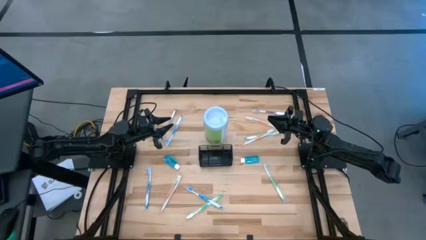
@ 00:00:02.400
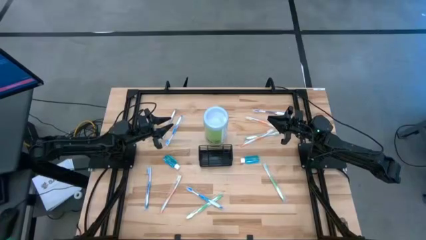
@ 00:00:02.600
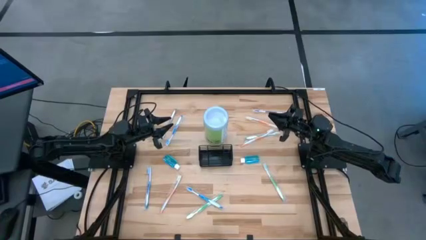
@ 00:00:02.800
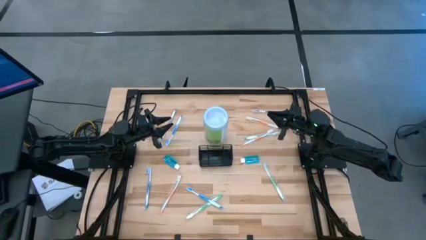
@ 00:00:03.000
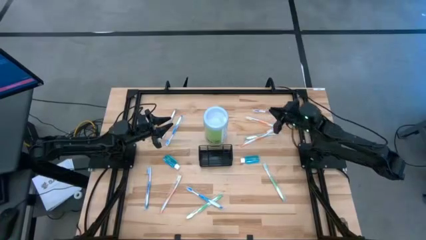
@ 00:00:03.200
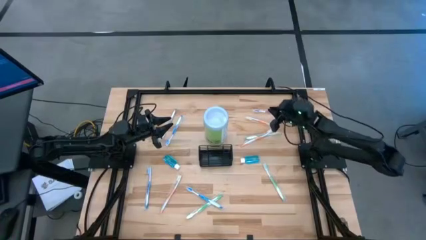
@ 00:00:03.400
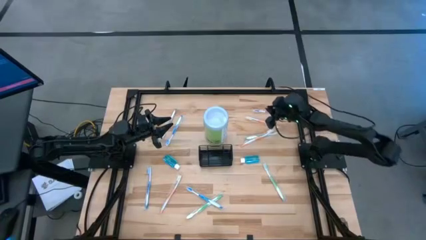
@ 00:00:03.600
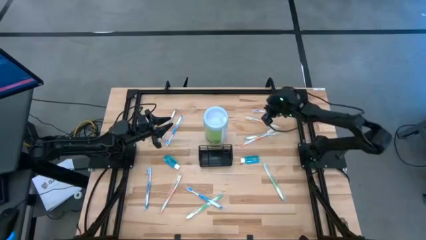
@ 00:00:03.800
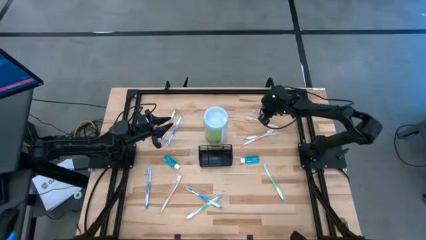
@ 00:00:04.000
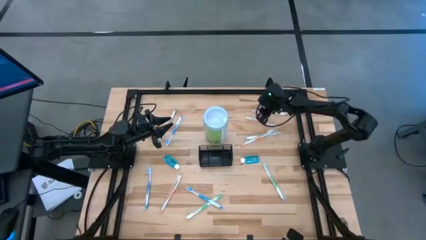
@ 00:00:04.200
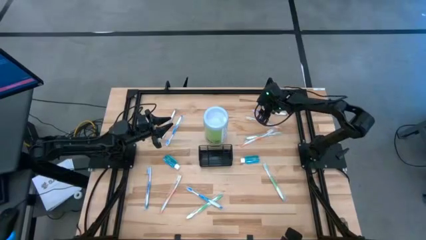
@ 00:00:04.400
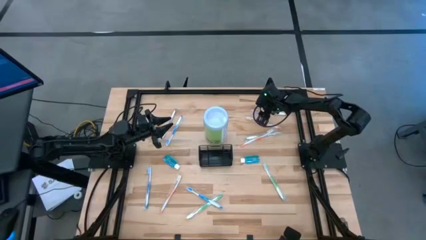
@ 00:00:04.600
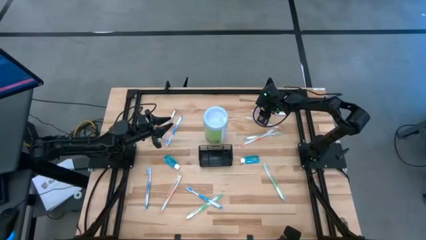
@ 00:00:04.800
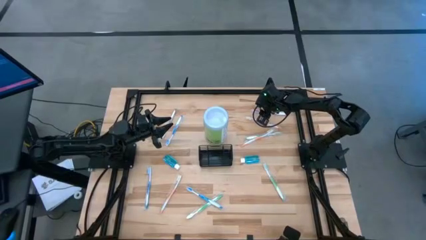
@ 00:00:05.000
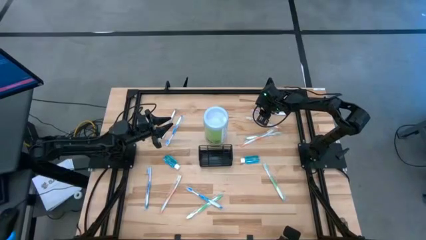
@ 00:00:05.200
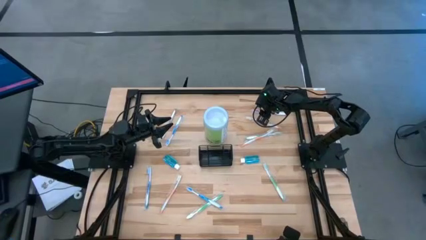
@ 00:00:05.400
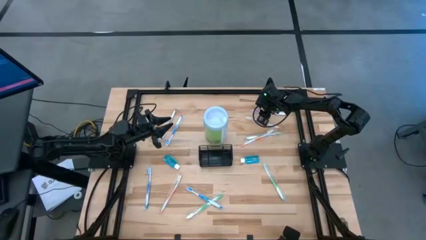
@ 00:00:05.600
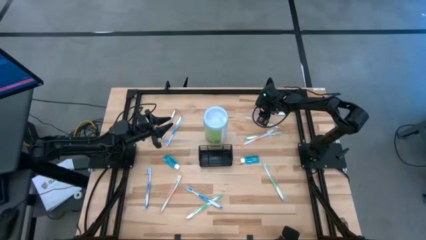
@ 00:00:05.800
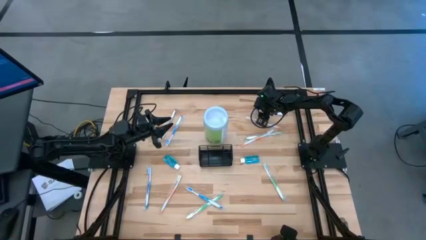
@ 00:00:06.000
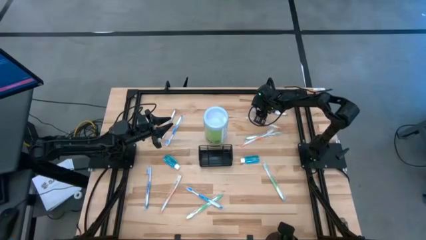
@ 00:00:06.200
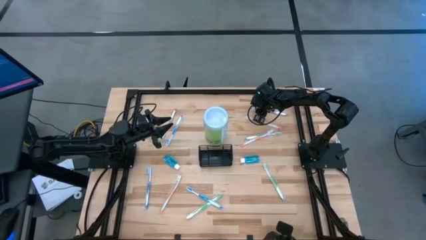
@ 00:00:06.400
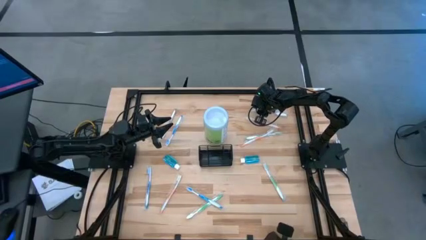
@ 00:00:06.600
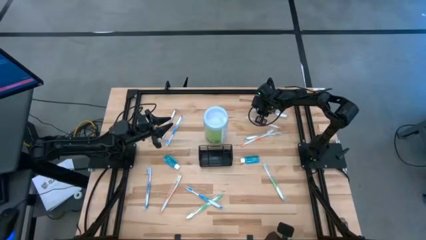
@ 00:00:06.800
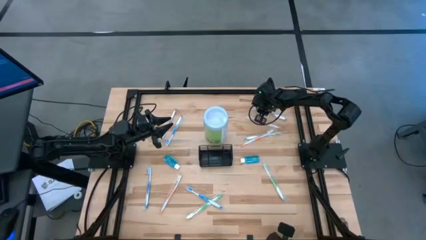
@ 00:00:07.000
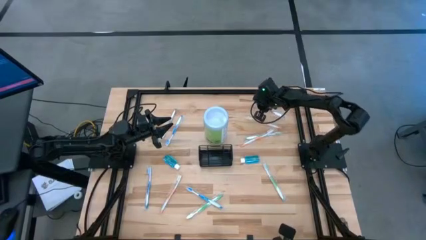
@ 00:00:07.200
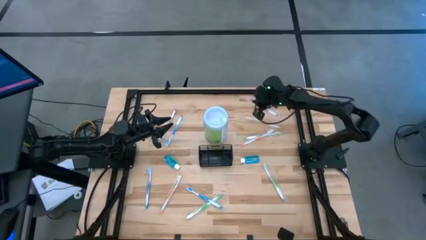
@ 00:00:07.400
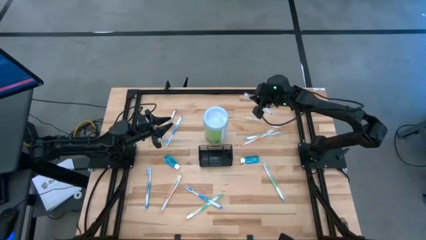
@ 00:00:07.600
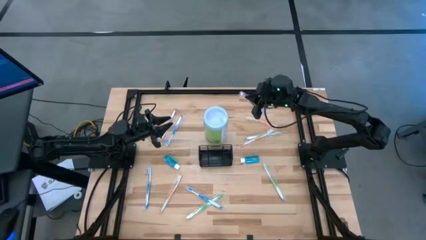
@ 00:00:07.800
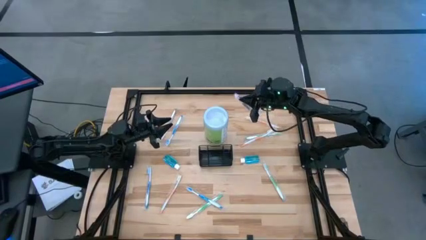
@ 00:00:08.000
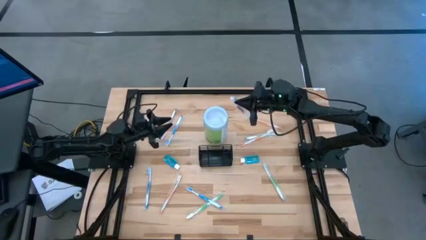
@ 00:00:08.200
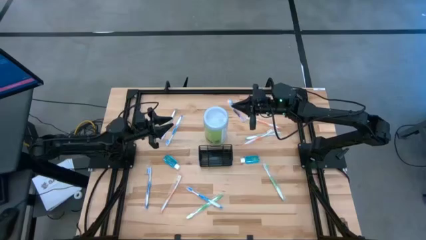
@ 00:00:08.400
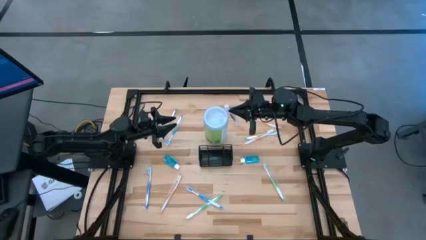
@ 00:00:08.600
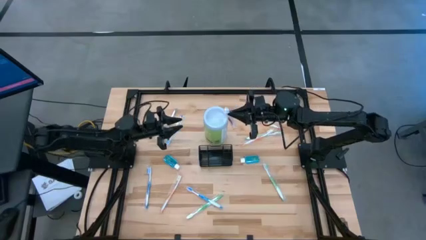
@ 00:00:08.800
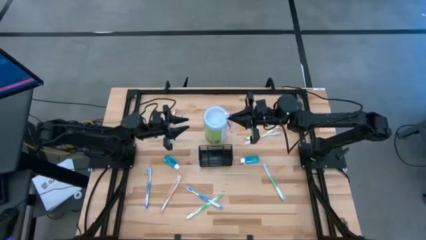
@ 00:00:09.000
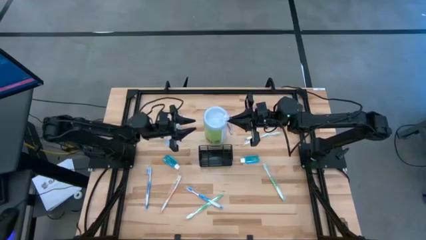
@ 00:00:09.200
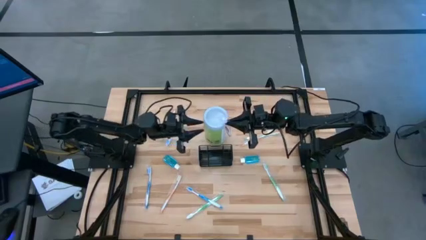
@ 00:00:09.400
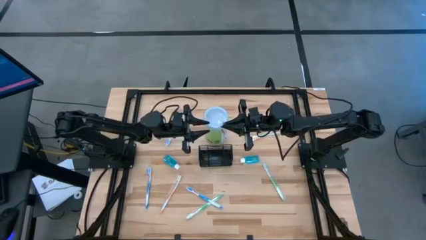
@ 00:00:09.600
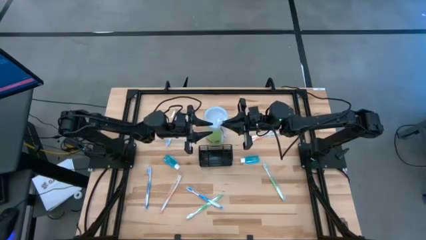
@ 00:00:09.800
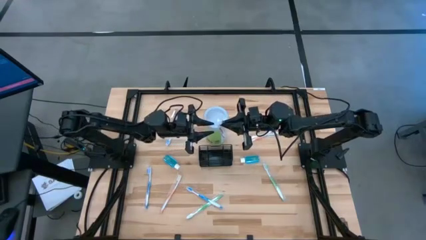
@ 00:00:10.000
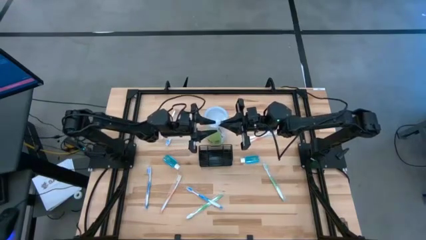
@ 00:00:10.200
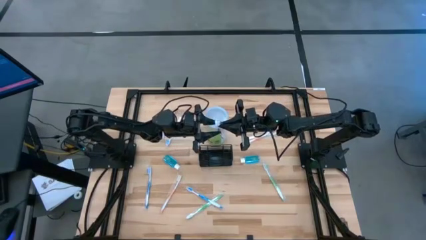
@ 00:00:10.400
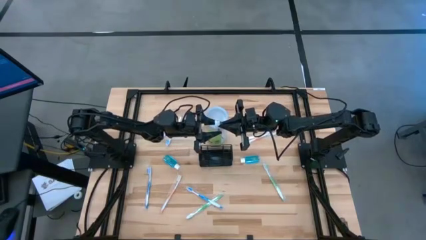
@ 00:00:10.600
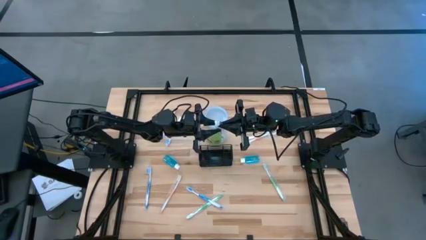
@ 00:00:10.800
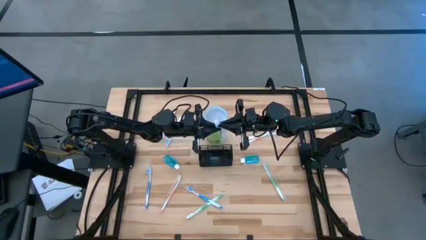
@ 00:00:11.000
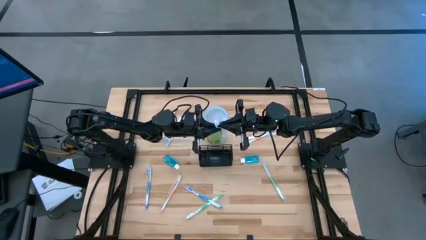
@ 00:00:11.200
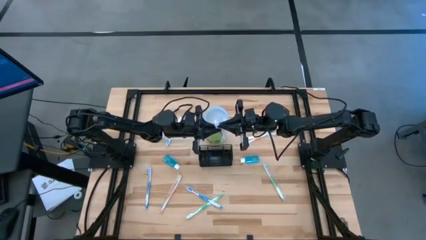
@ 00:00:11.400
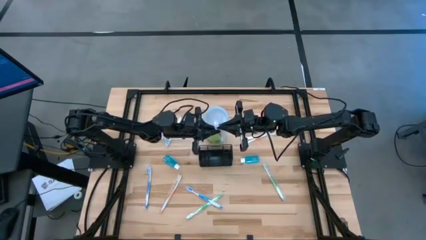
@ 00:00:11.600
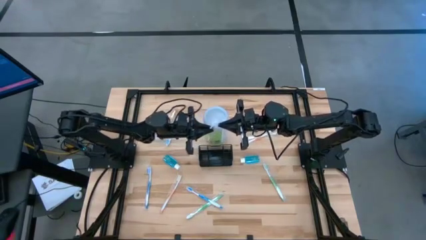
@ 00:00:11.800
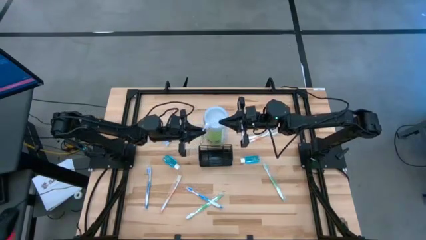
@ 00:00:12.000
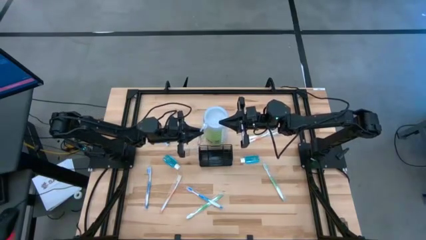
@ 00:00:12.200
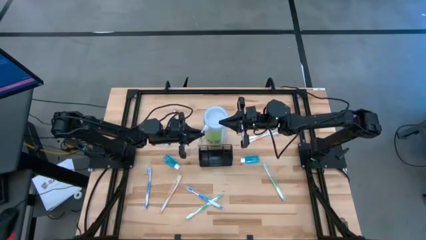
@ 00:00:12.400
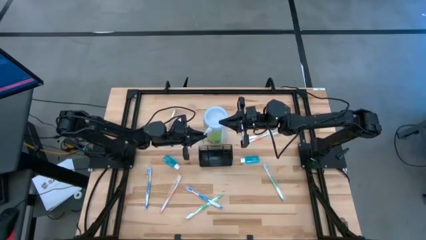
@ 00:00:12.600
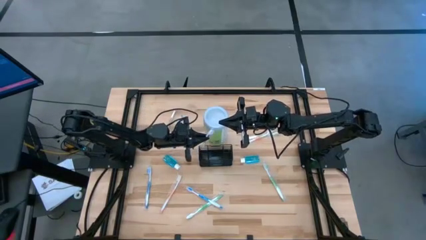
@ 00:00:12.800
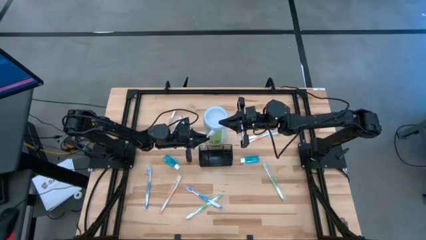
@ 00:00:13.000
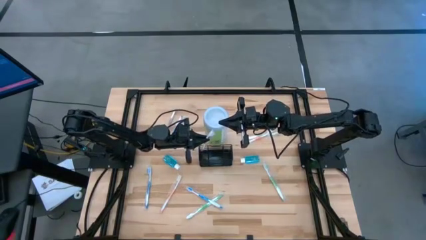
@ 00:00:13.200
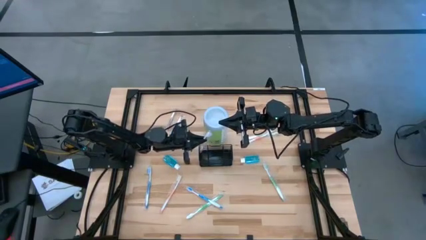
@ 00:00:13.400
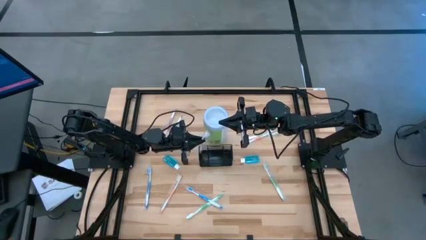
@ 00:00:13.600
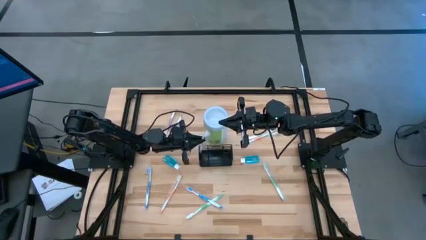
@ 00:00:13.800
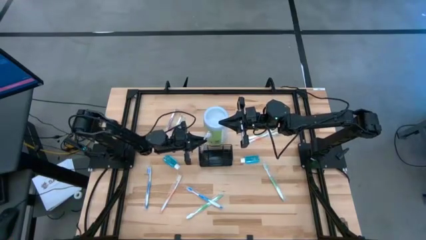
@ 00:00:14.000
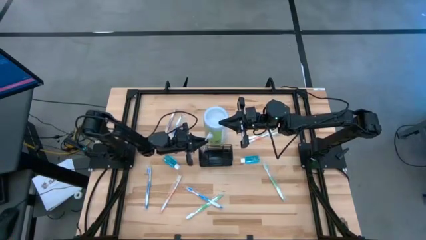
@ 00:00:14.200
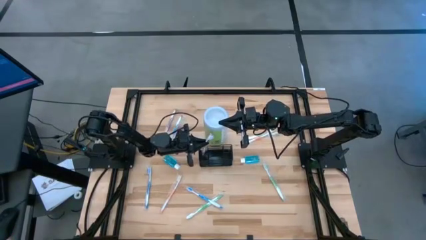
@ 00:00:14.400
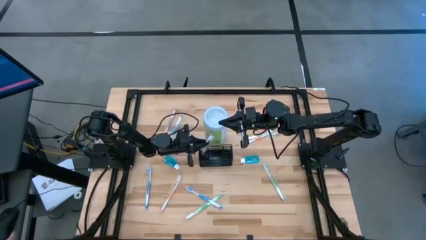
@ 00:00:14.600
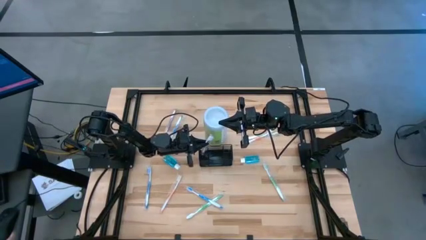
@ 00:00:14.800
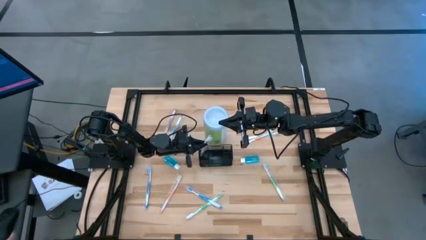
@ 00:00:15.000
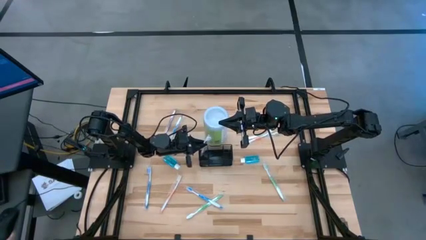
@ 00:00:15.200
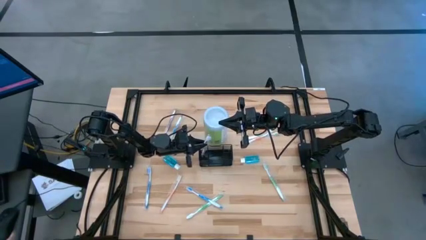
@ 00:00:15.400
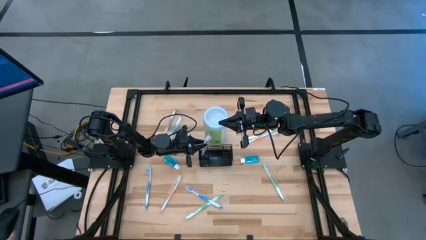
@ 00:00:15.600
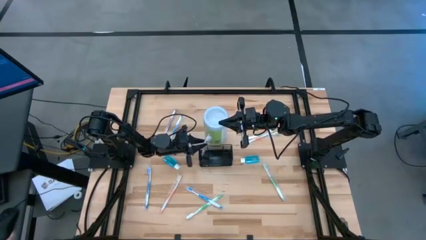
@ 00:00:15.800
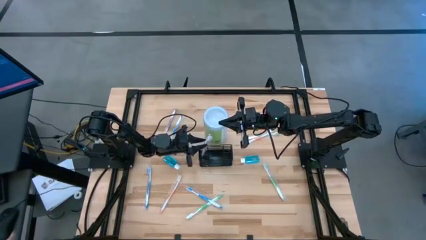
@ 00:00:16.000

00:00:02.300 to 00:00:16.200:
Task: Pick & Place toothbrushing station
Put the right violet toothbrush into the wire organizer
